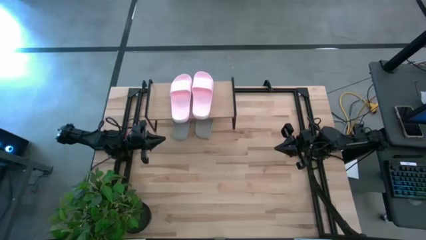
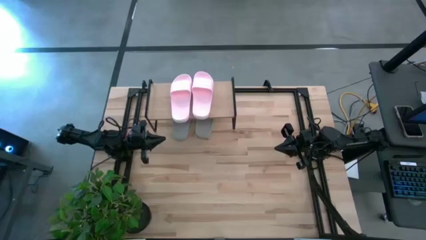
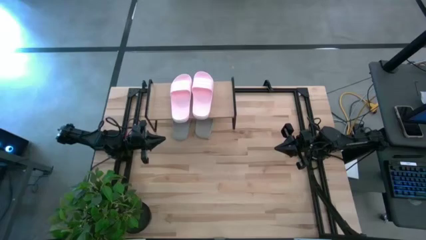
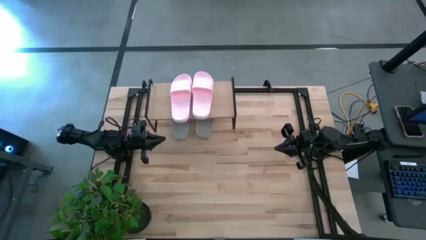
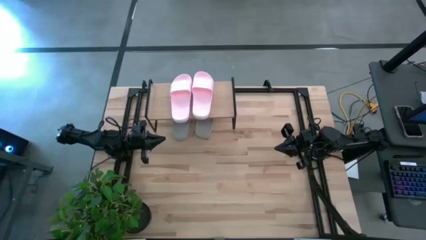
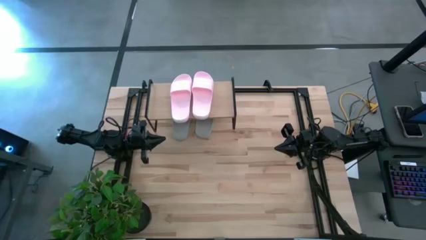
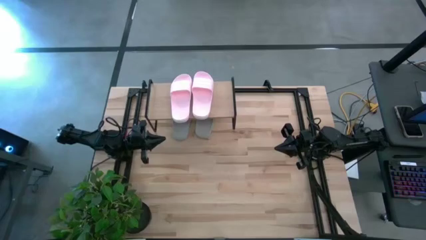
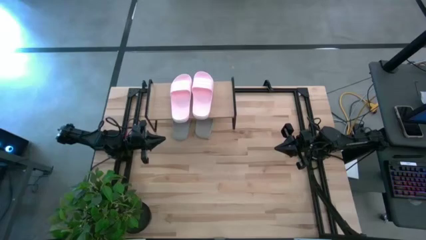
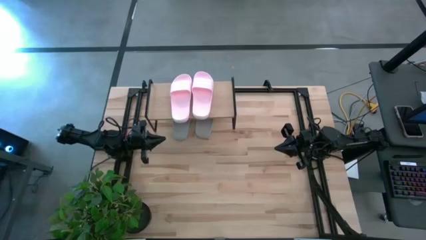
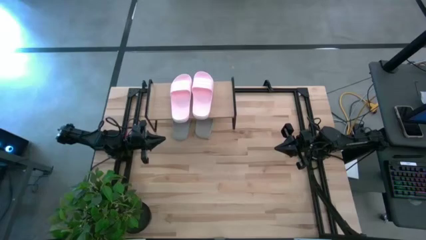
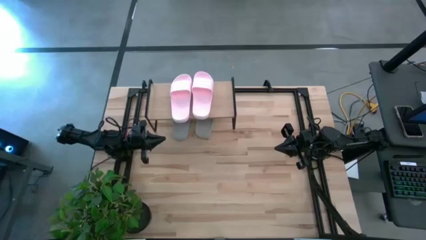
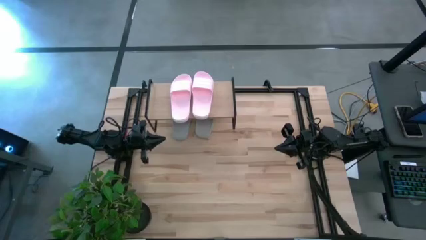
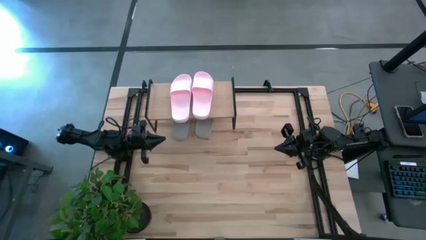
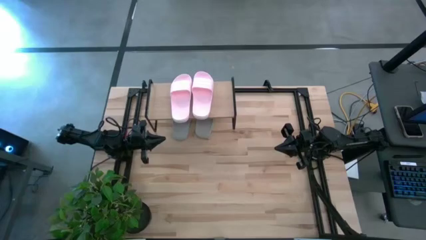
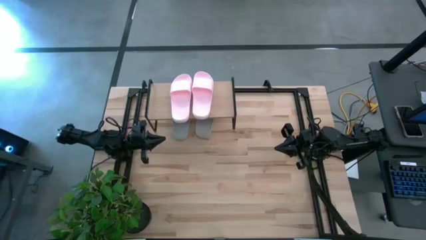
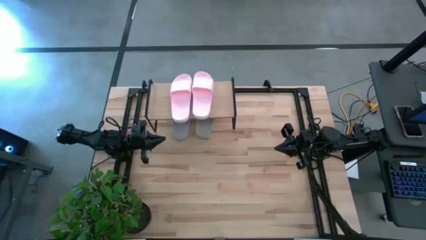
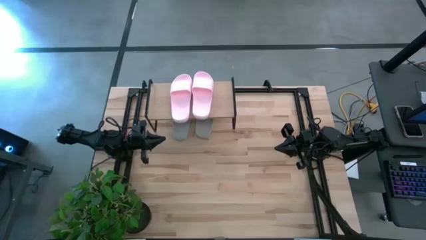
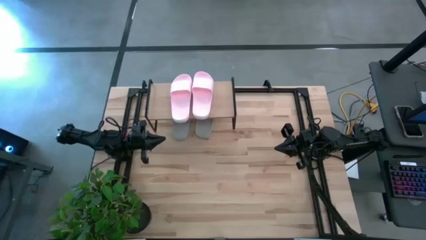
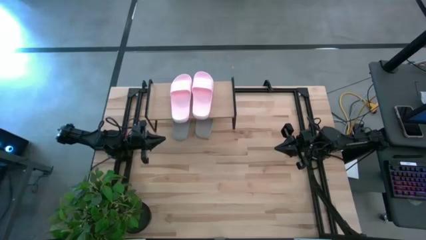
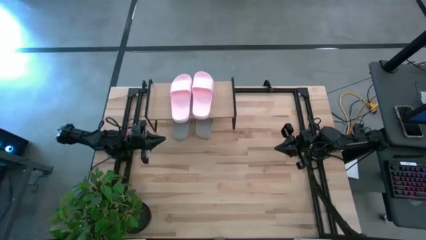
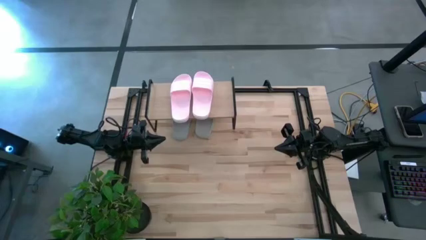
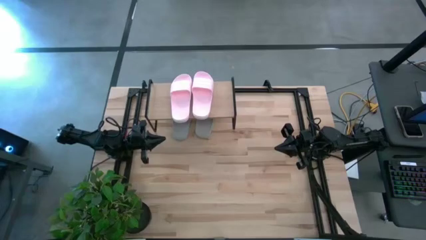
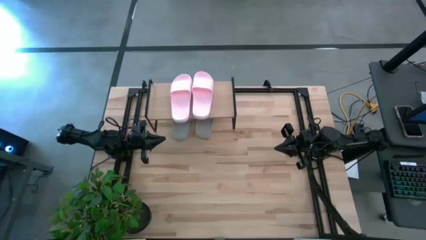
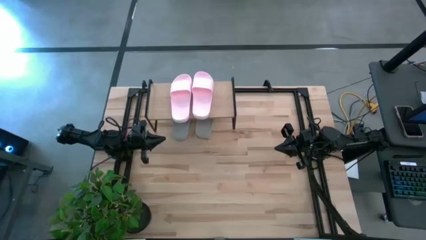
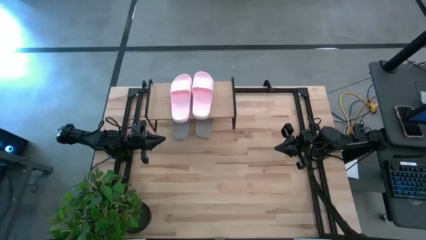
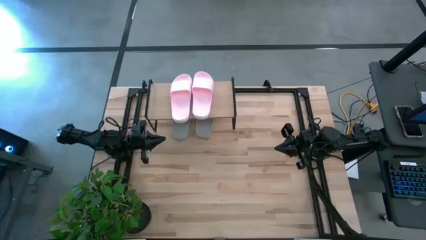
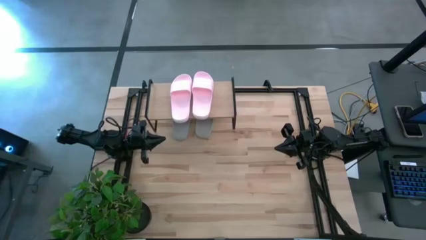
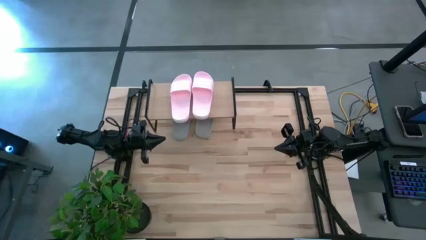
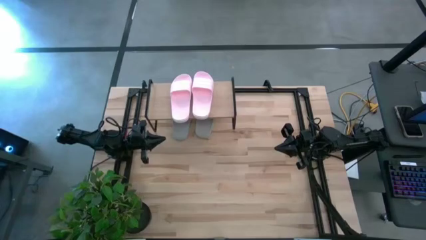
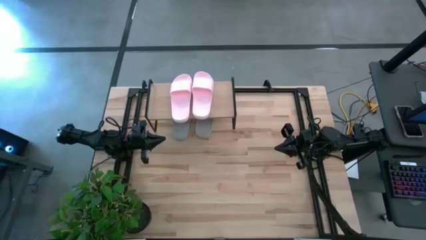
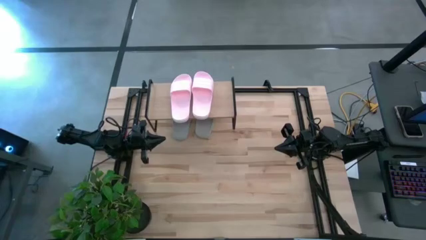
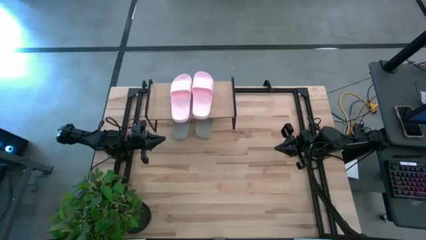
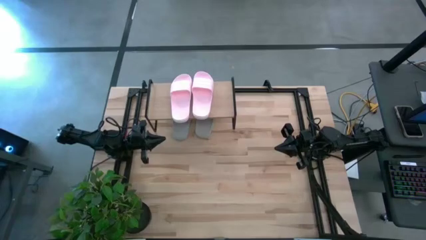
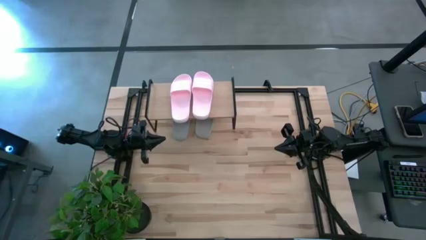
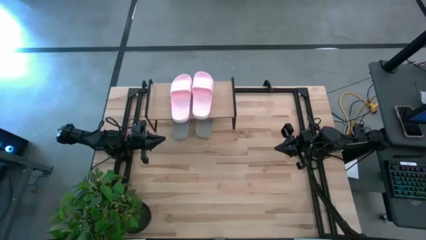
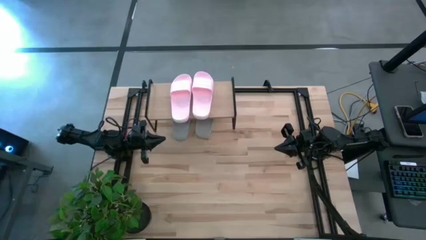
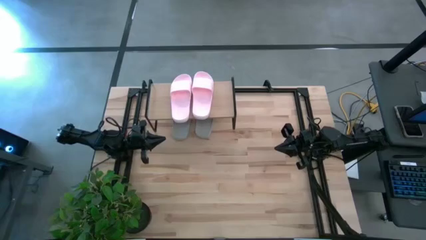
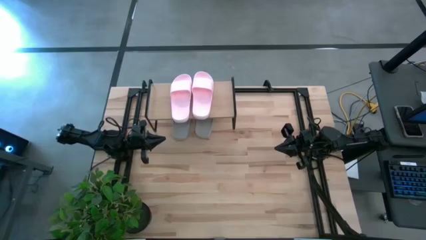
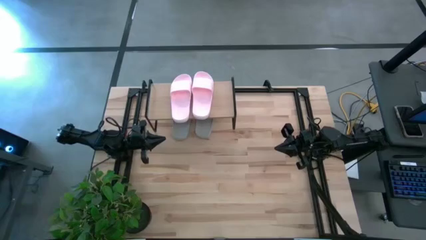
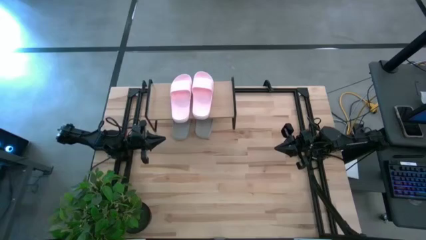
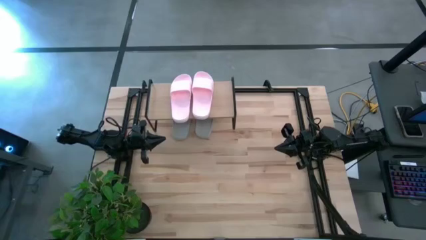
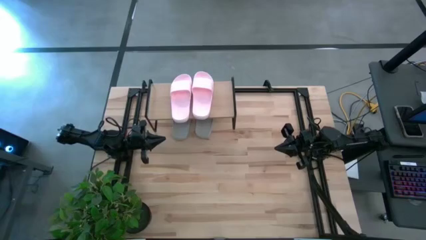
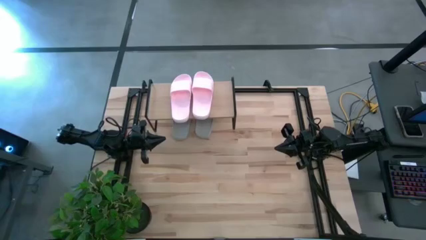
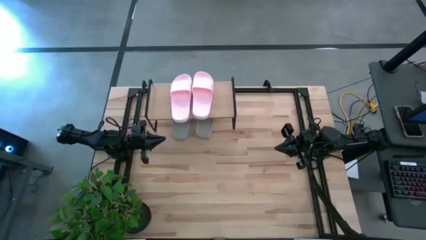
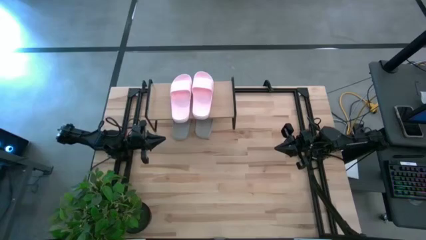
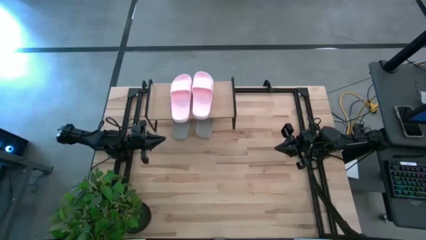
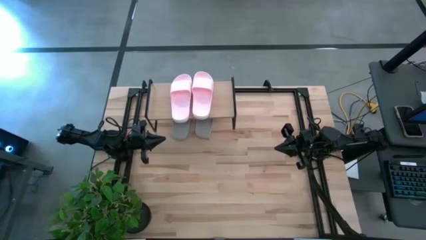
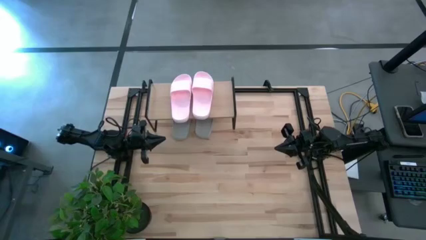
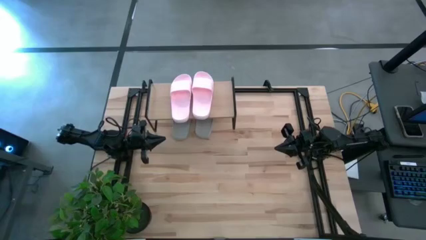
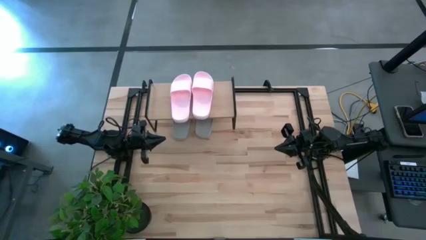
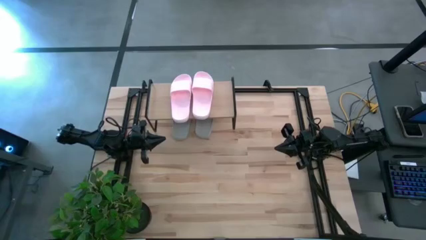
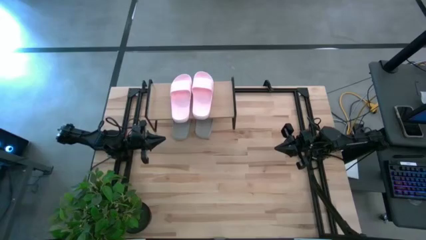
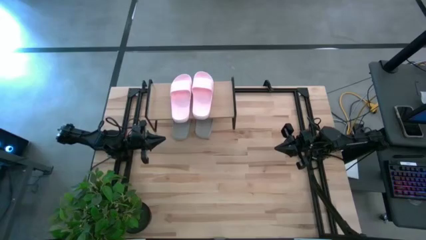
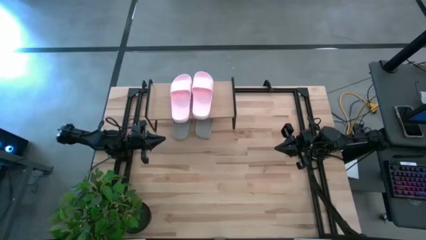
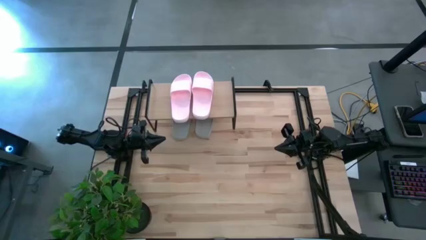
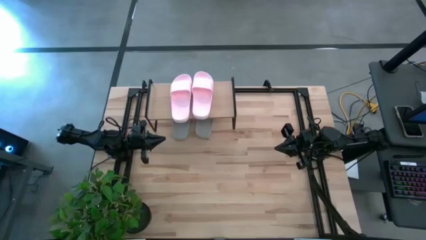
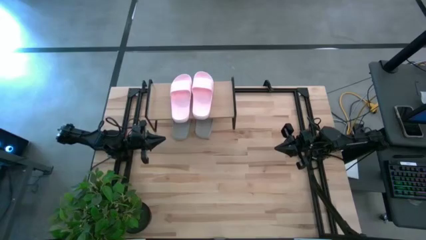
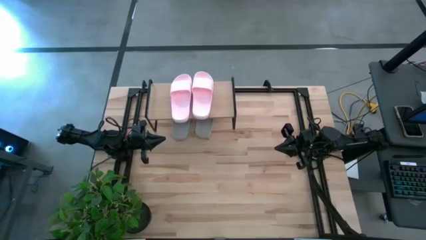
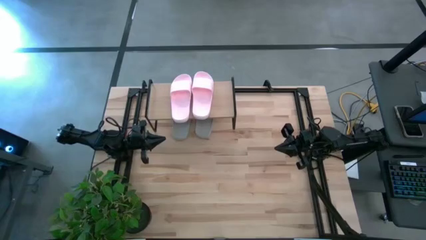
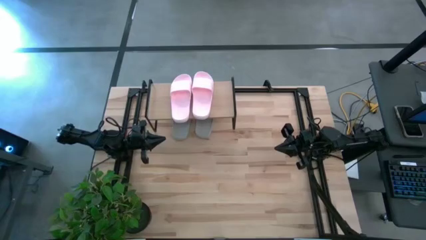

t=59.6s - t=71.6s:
Task: Pick and place slides into the shelf
Return to Home Position
